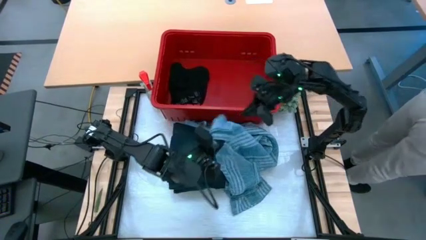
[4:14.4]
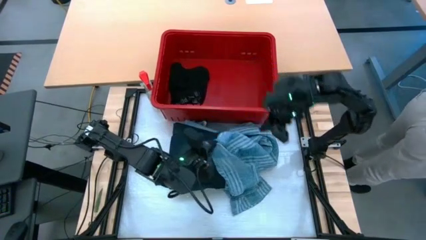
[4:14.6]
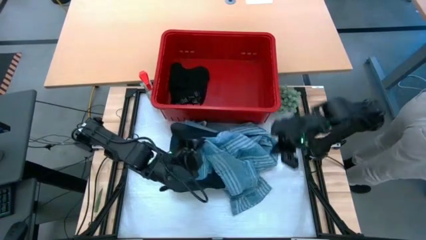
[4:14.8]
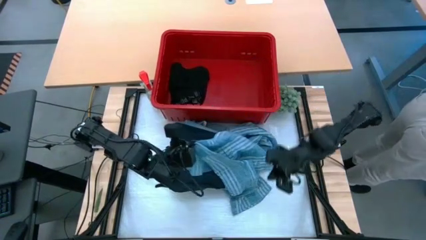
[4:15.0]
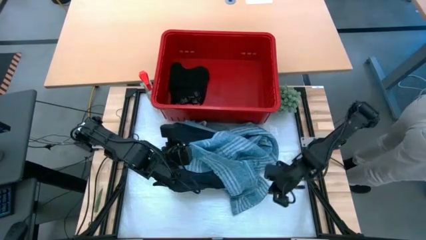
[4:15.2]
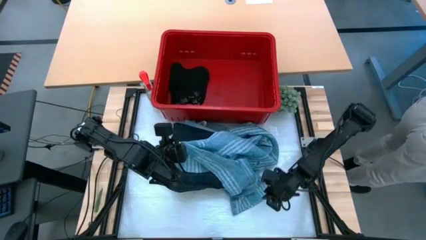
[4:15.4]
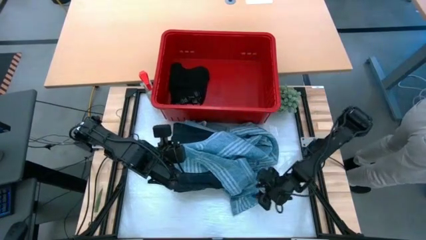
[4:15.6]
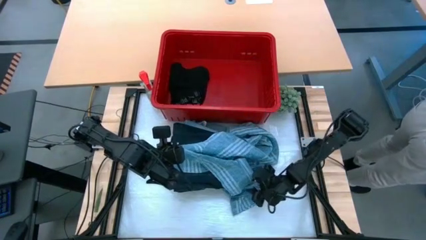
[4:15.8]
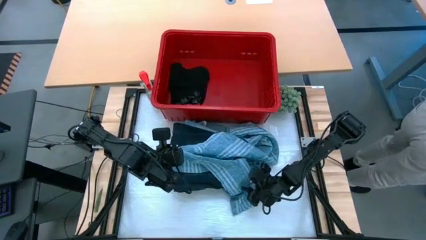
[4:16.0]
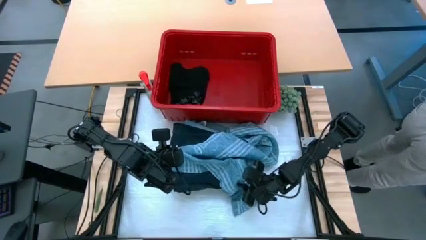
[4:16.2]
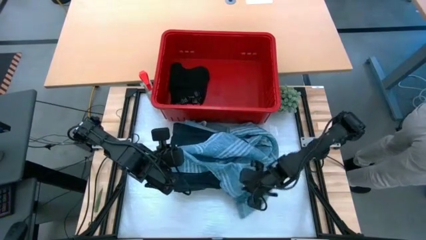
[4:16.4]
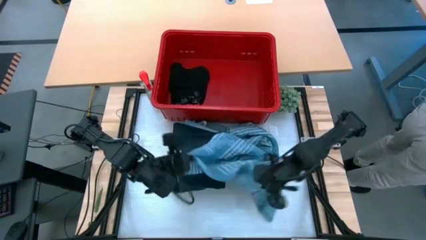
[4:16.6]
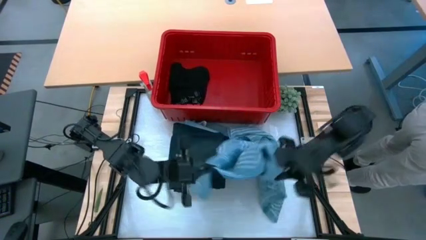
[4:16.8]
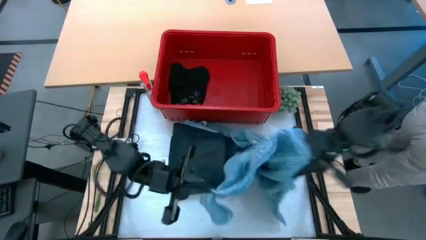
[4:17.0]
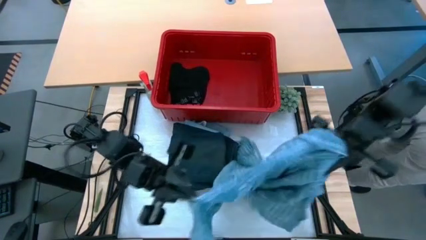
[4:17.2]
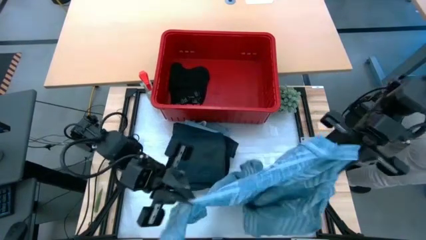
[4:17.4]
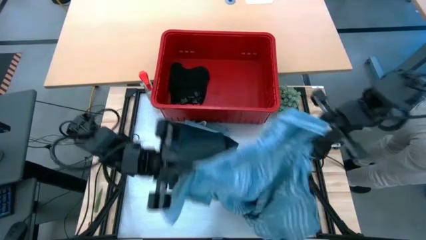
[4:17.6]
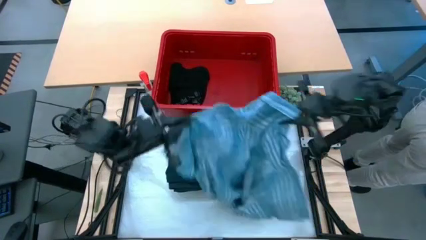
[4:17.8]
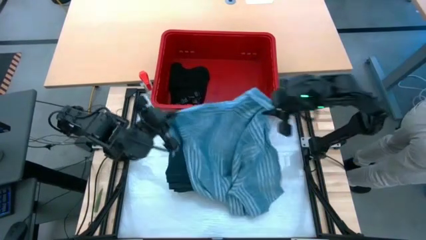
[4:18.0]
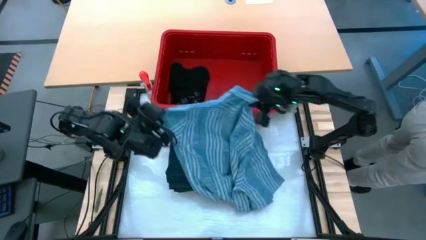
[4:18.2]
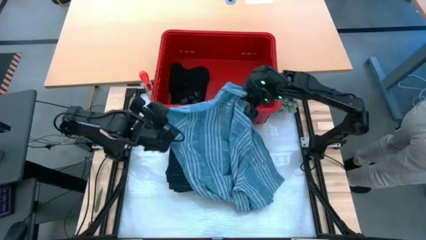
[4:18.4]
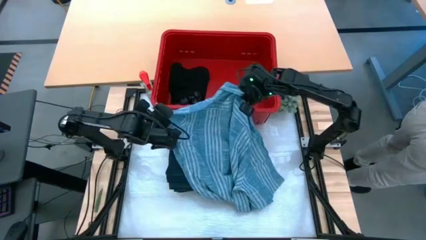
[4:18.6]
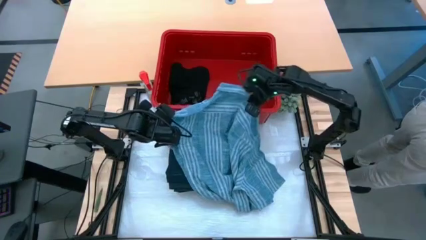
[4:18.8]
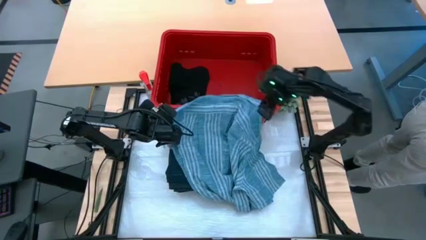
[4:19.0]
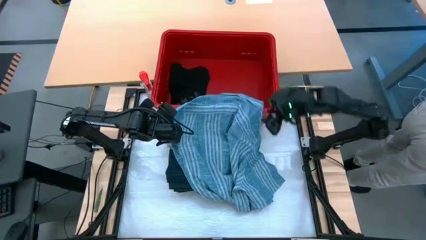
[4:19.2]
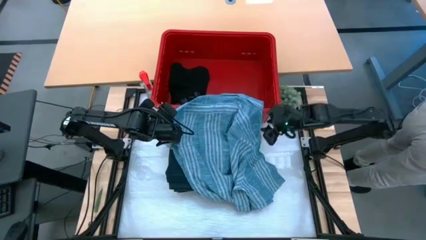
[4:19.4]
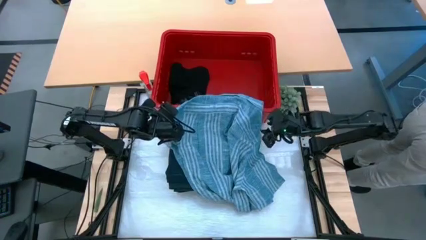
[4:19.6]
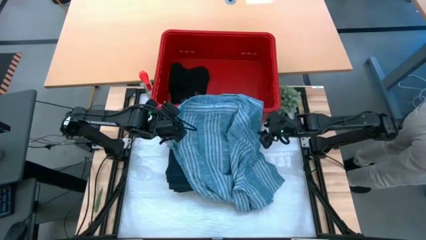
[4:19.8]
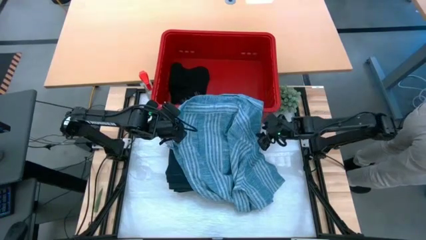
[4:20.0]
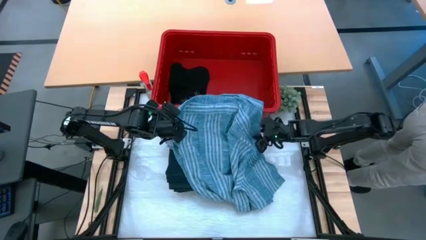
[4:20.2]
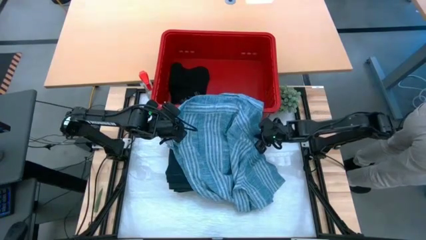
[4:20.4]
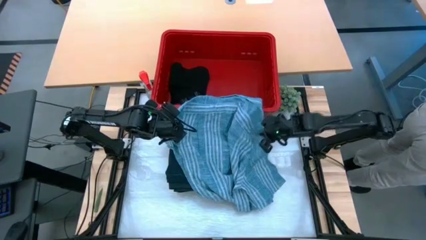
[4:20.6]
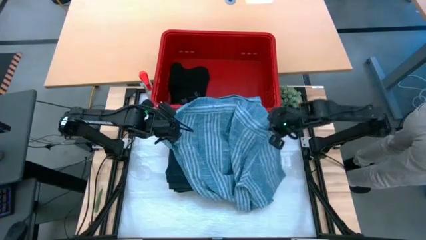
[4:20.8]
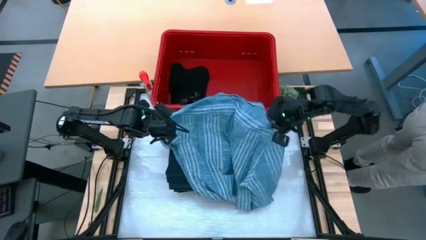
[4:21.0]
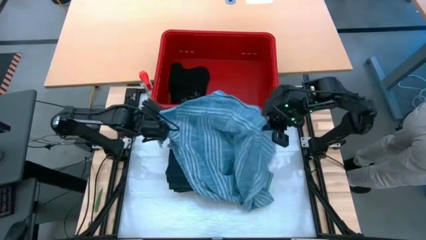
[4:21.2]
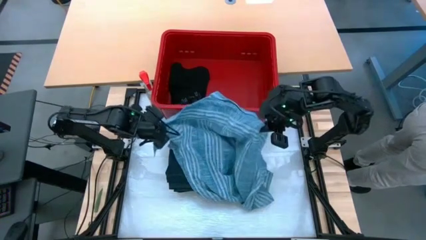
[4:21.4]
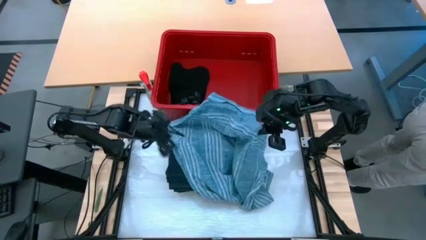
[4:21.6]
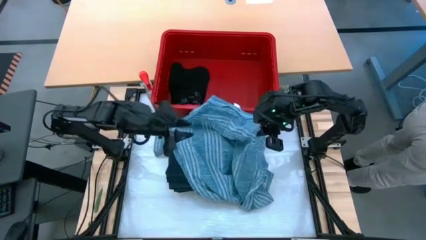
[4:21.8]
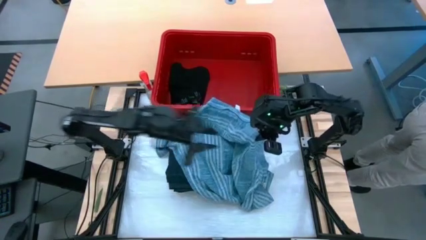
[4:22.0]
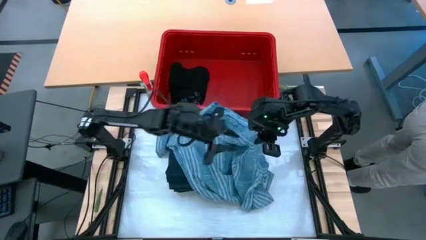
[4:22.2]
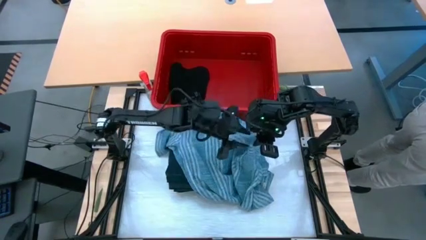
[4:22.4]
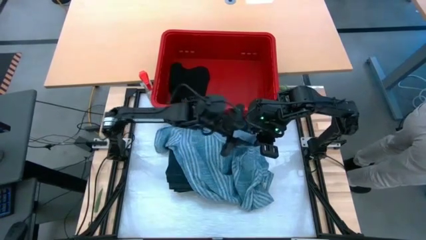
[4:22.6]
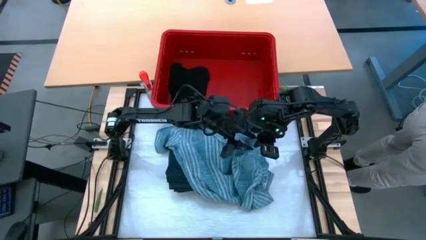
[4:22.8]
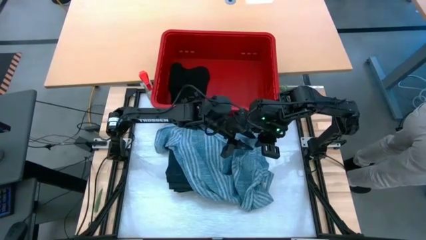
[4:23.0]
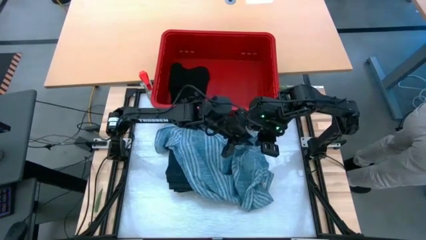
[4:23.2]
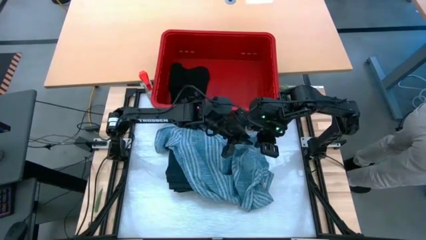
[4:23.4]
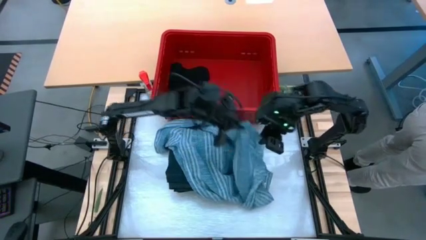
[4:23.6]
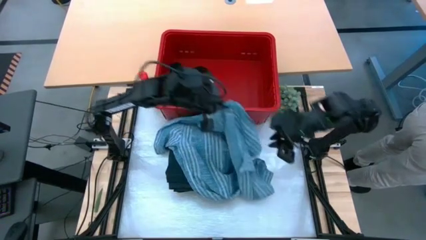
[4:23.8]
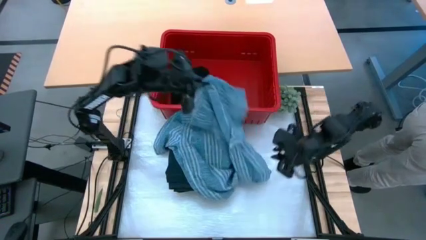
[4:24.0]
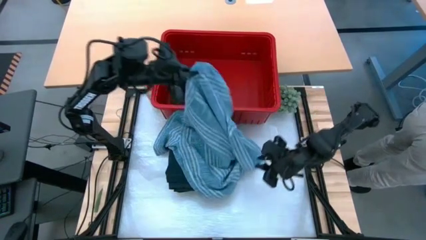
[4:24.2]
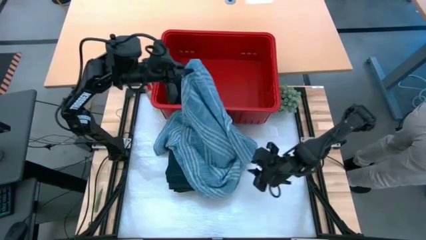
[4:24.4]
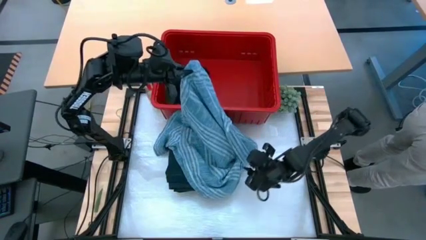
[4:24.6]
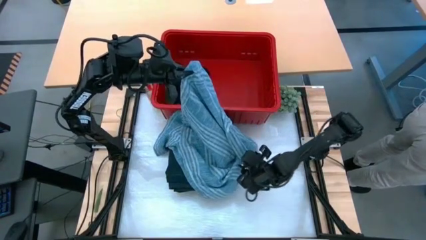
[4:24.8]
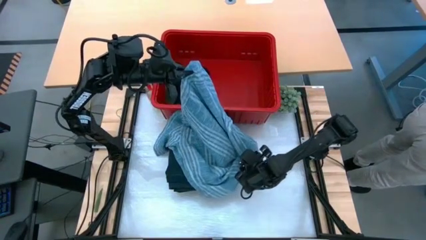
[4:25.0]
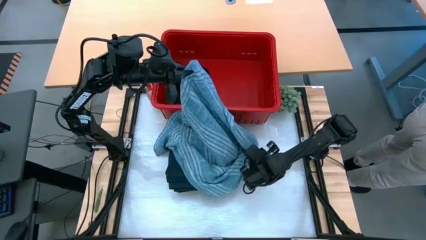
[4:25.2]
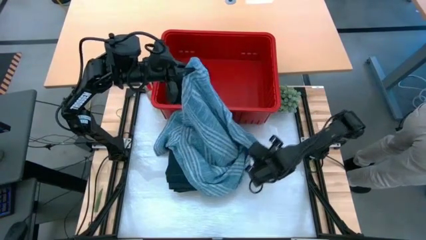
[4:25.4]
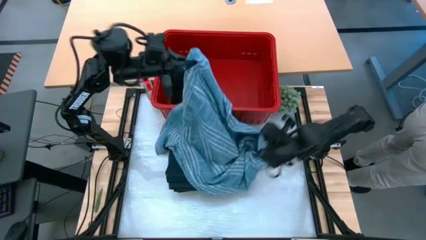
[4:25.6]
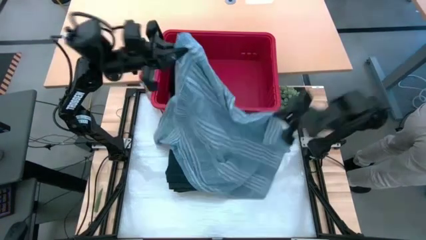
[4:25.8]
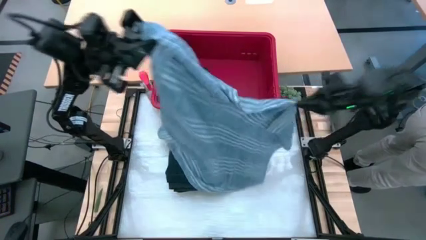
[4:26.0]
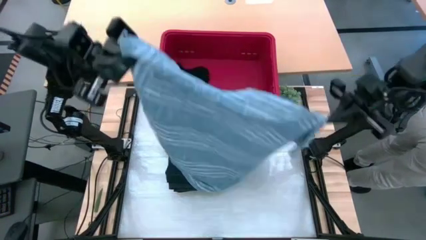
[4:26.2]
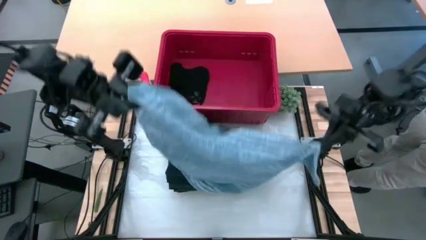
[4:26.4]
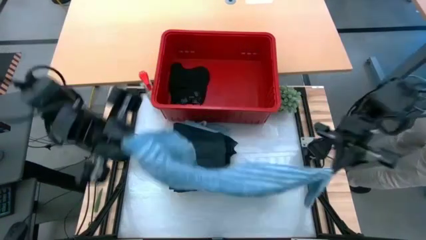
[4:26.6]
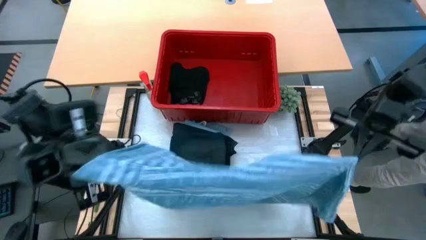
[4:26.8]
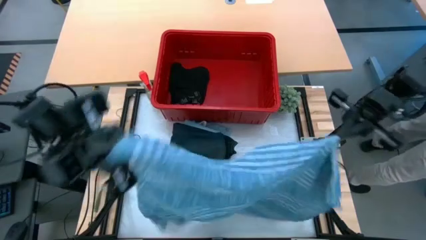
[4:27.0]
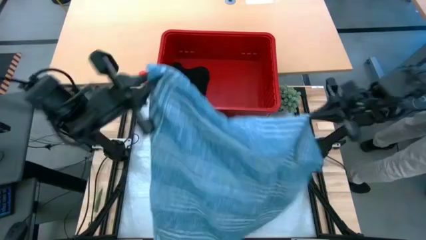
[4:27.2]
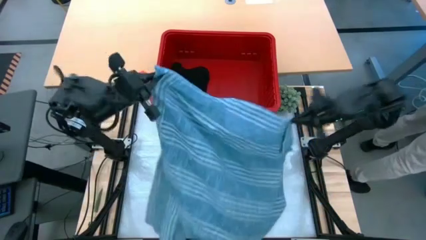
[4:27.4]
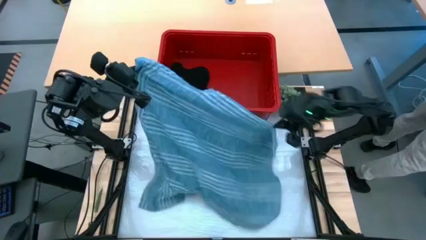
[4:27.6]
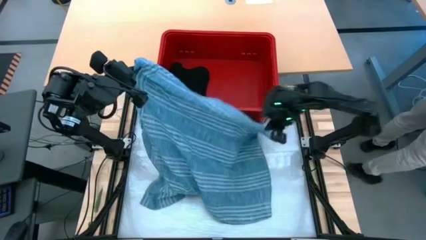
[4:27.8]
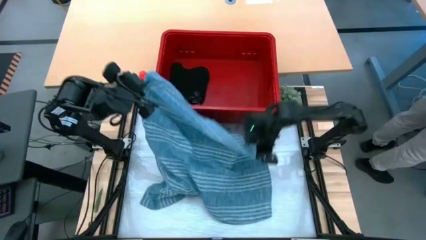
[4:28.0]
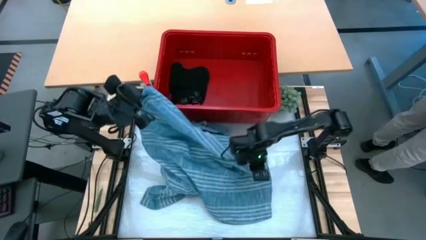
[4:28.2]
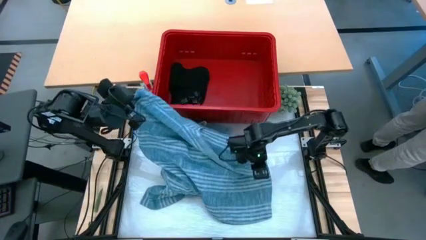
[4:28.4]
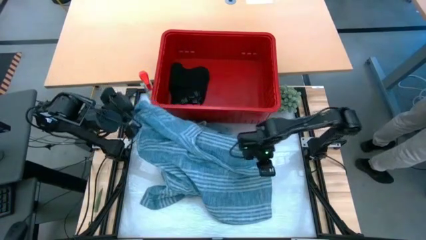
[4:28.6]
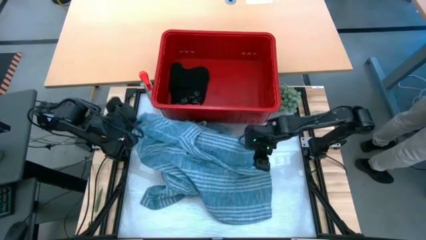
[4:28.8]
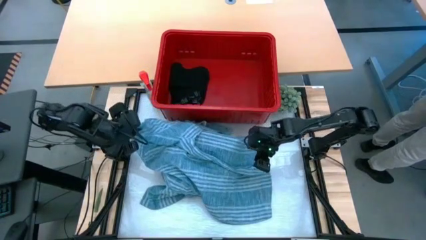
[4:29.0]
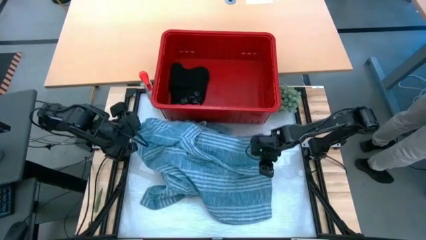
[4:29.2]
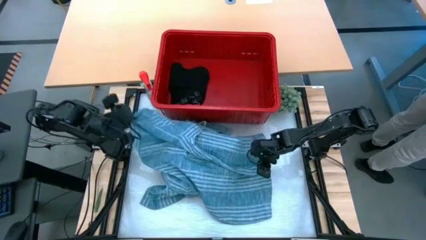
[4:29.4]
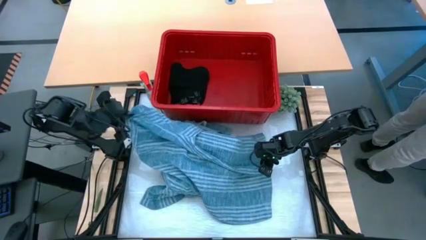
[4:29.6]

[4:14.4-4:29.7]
Task: Fold Laundry from Bin
Fold the blue and white patterned shirt

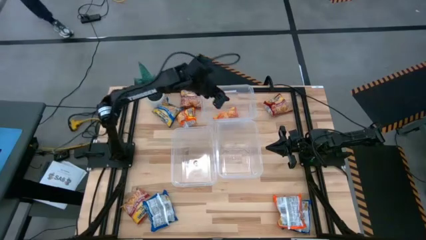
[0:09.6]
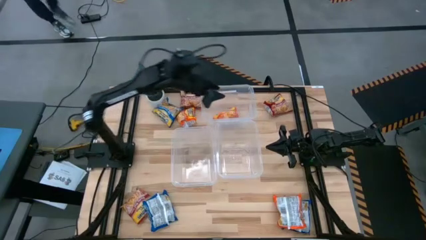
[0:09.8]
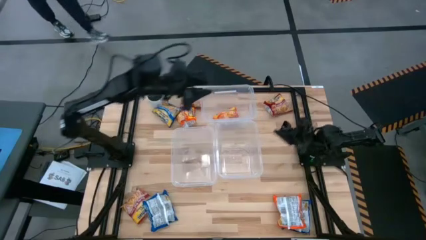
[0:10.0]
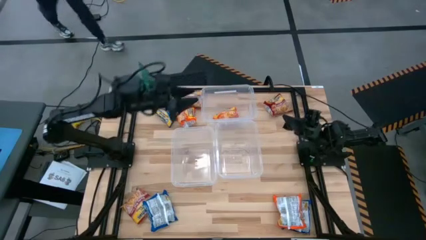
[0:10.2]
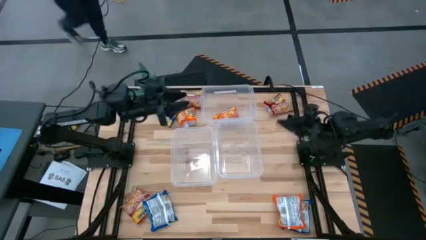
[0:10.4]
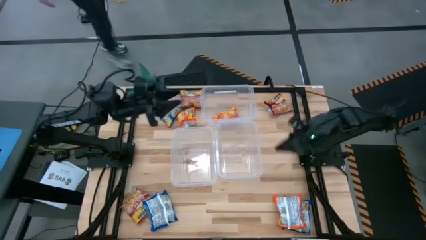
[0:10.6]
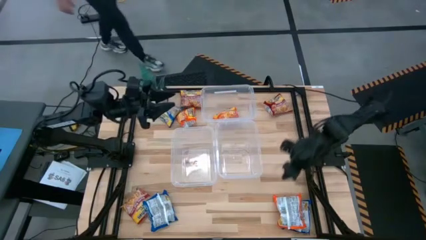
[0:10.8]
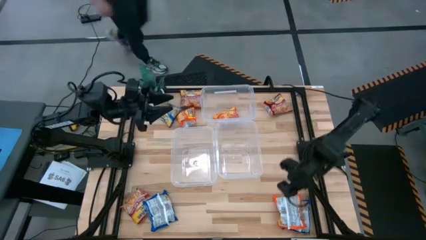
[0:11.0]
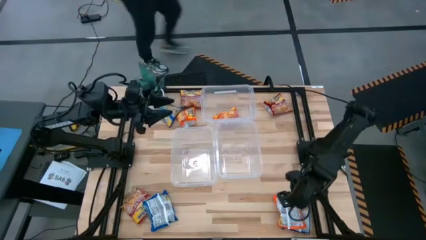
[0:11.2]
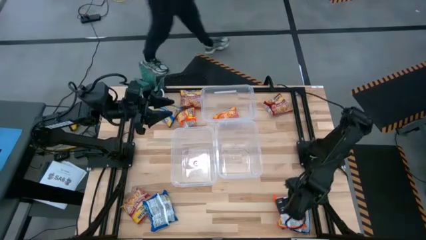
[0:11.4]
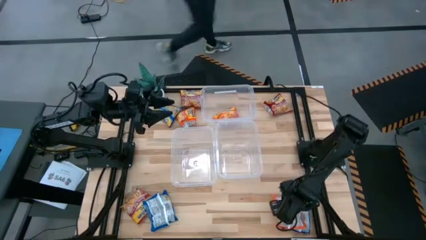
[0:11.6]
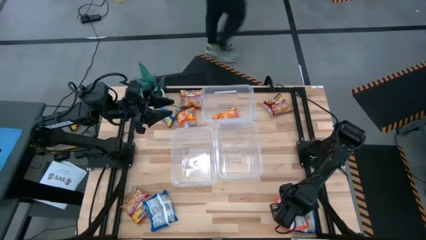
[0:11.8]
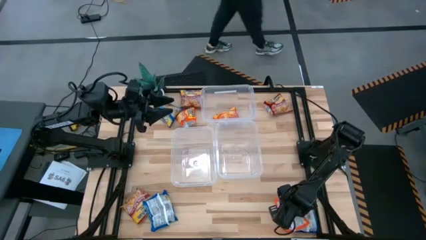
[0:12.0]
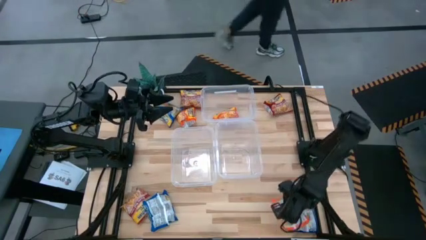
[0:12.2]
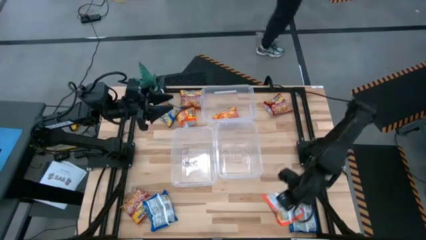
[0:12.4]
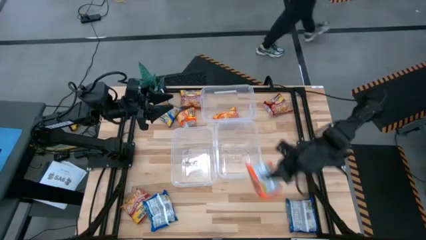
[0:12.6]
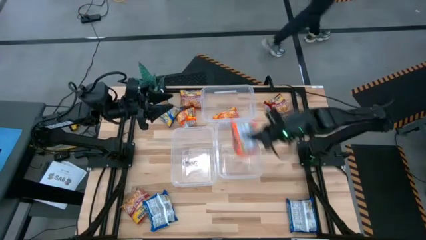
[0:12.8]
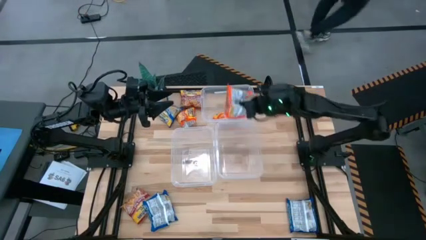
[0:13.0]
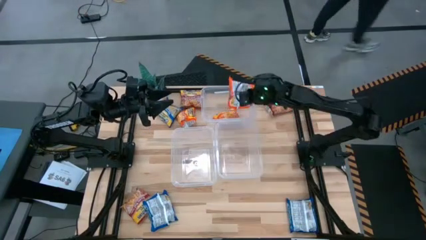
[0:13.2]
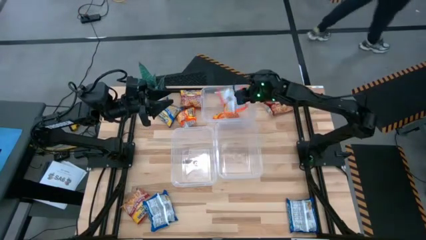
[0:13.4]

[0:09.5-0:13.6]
Task: Sort Maruchan noodles
Put the bottom orange noodle pack into the top transparent bin
